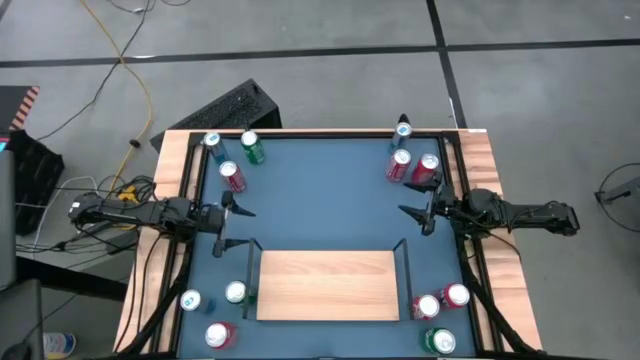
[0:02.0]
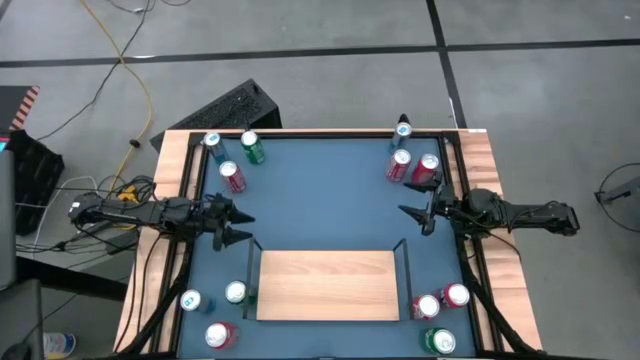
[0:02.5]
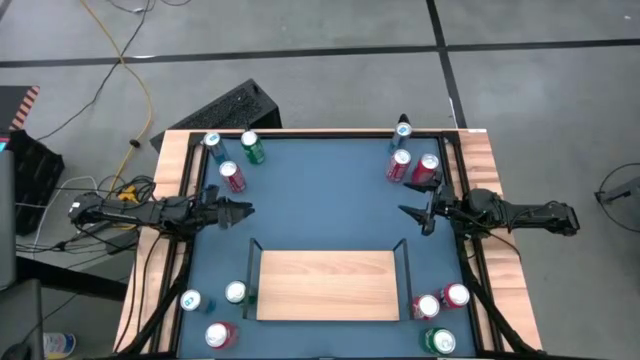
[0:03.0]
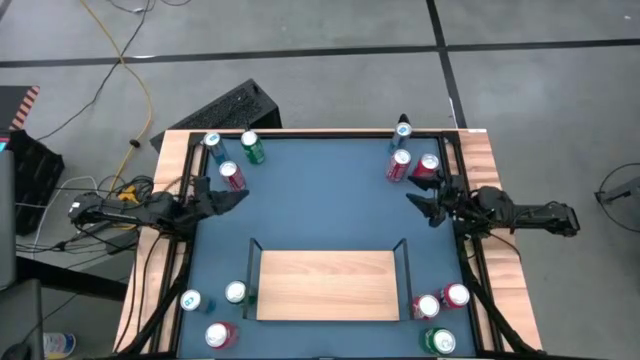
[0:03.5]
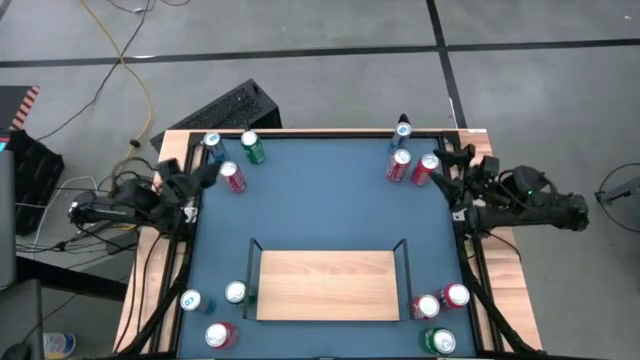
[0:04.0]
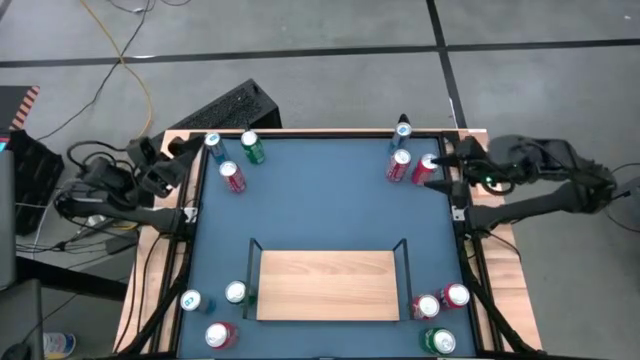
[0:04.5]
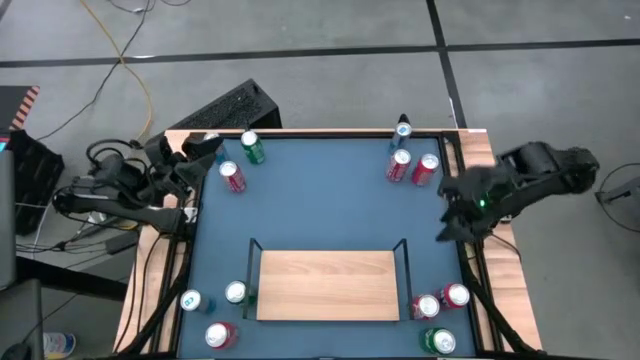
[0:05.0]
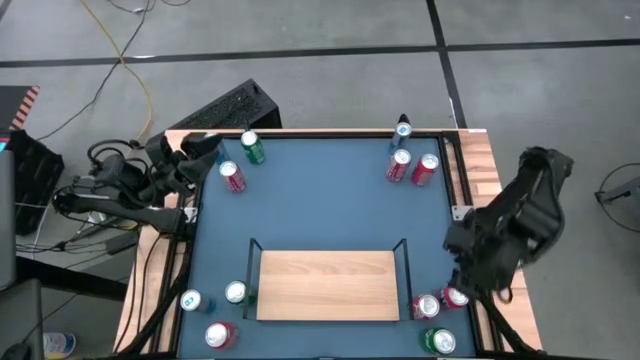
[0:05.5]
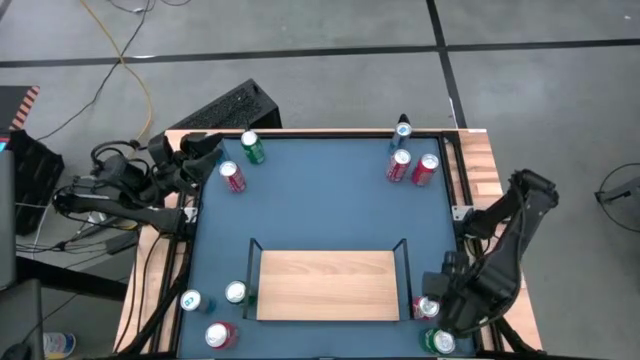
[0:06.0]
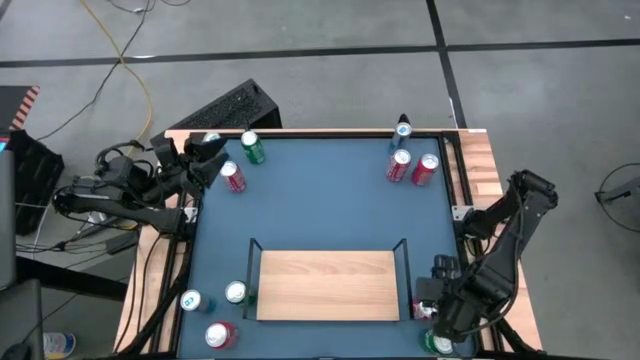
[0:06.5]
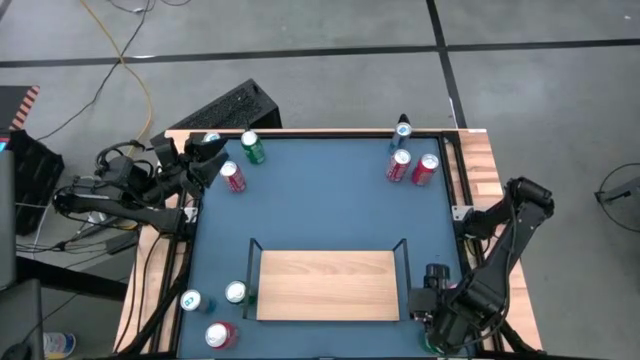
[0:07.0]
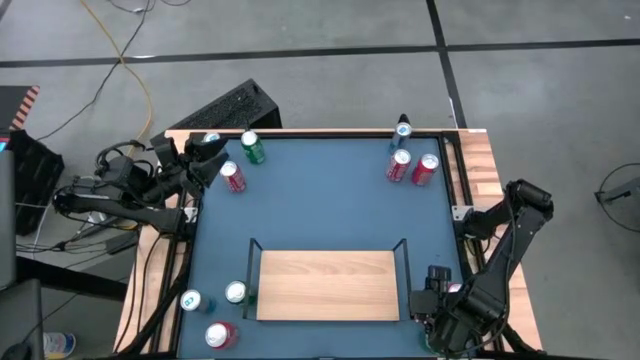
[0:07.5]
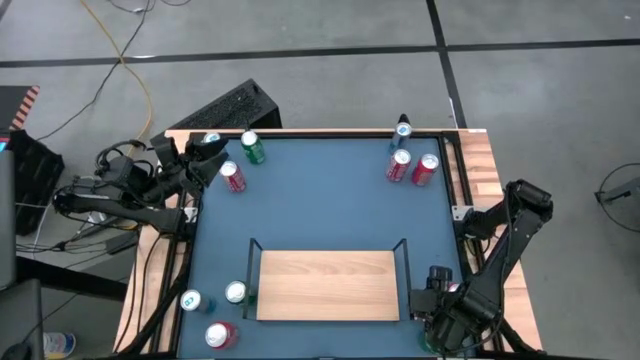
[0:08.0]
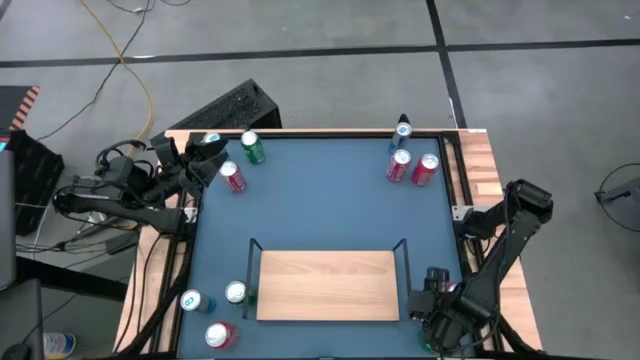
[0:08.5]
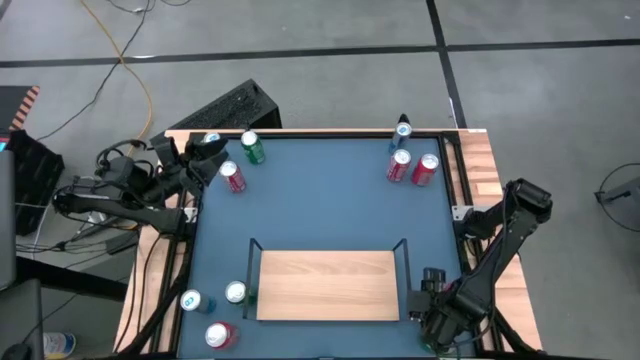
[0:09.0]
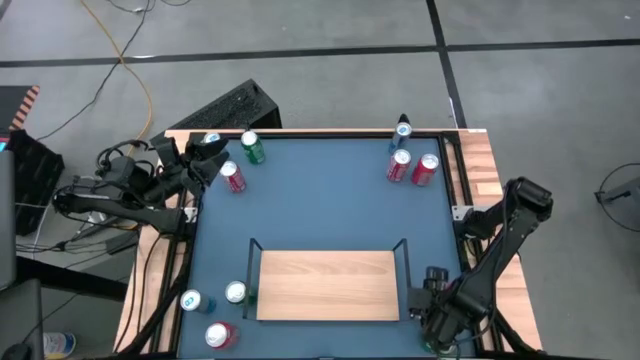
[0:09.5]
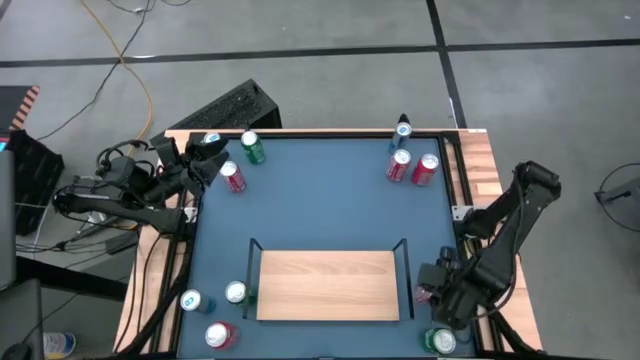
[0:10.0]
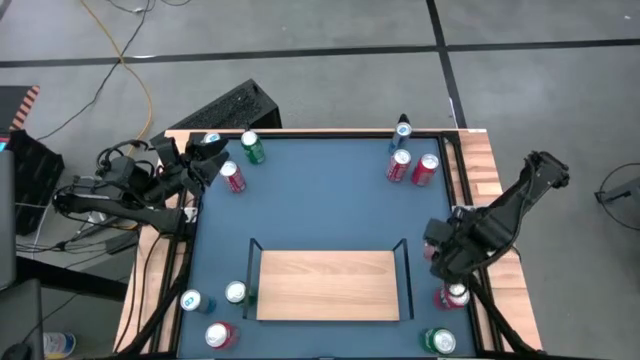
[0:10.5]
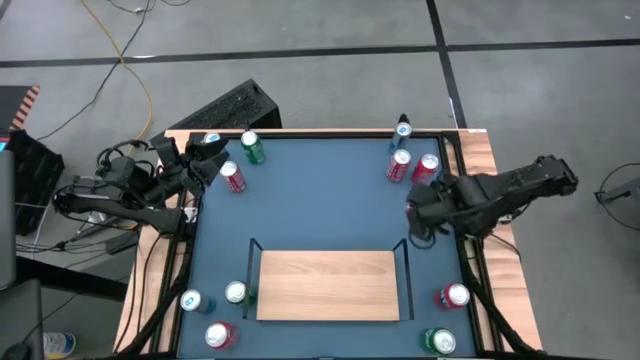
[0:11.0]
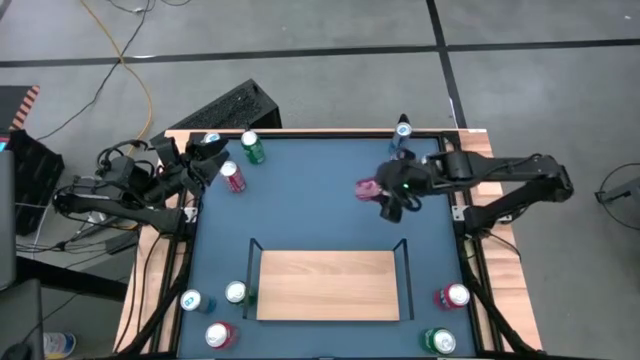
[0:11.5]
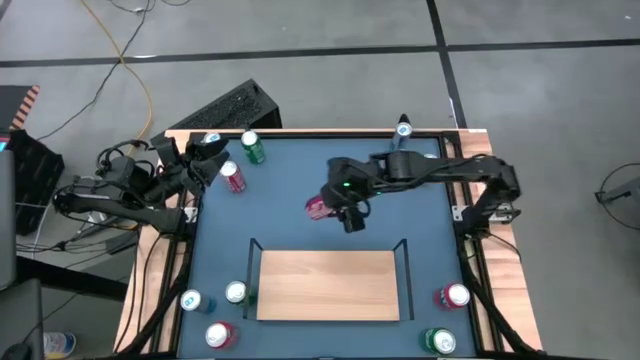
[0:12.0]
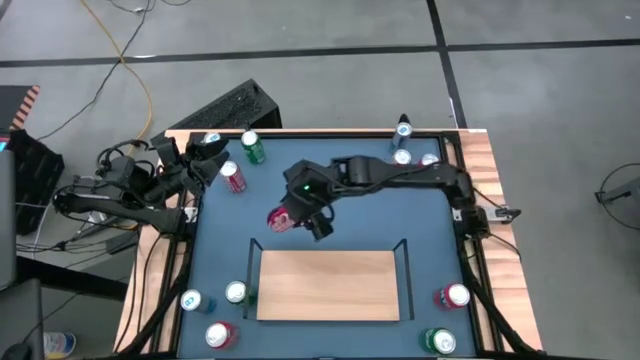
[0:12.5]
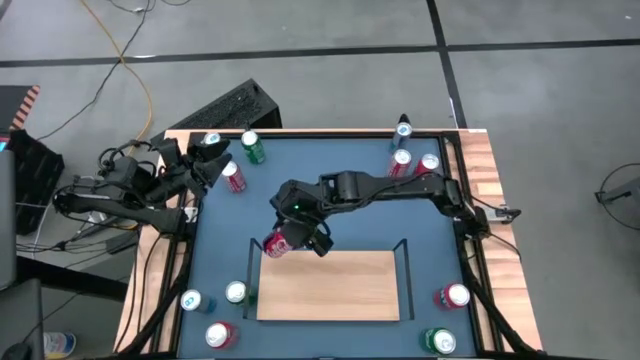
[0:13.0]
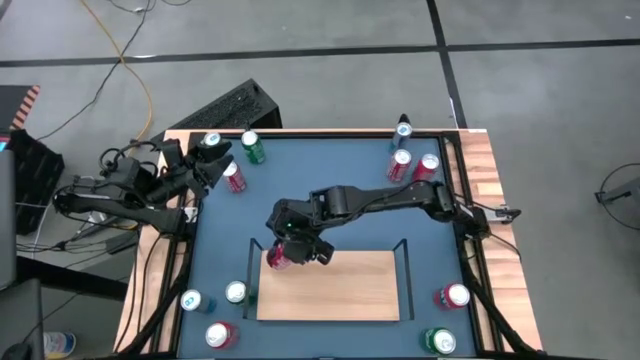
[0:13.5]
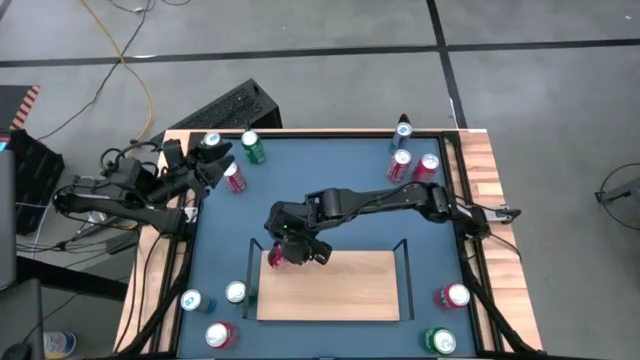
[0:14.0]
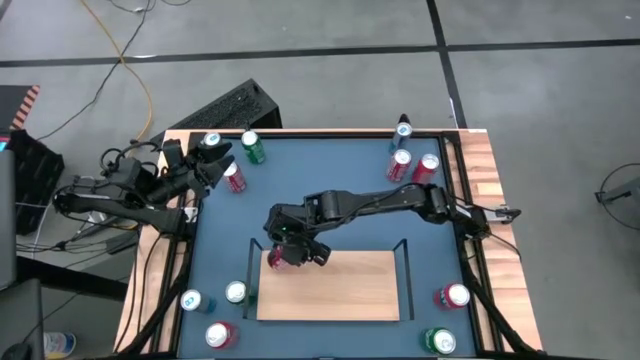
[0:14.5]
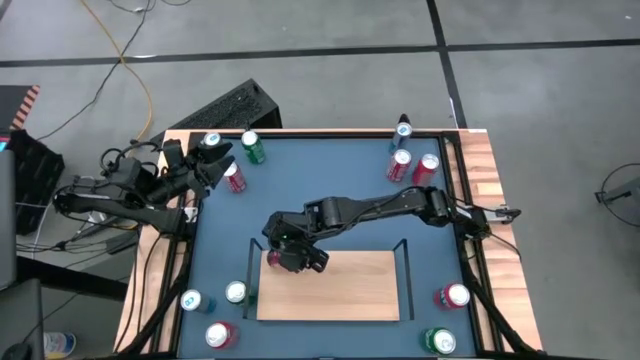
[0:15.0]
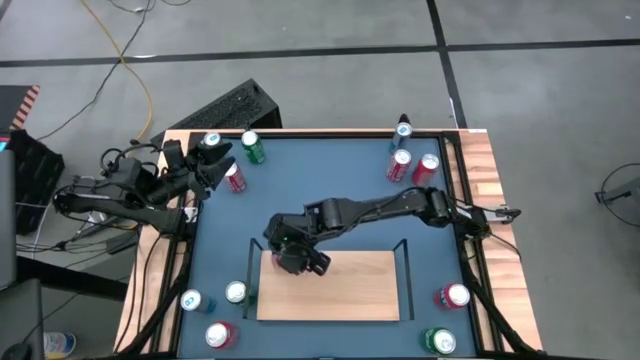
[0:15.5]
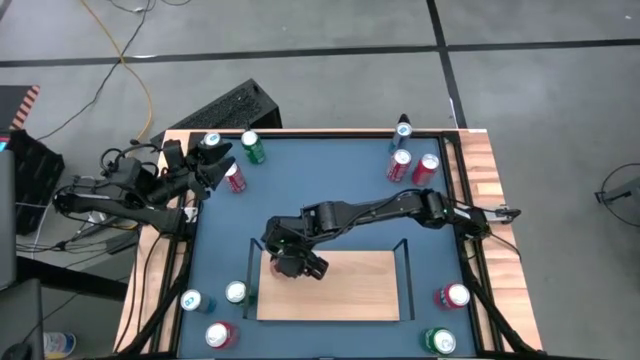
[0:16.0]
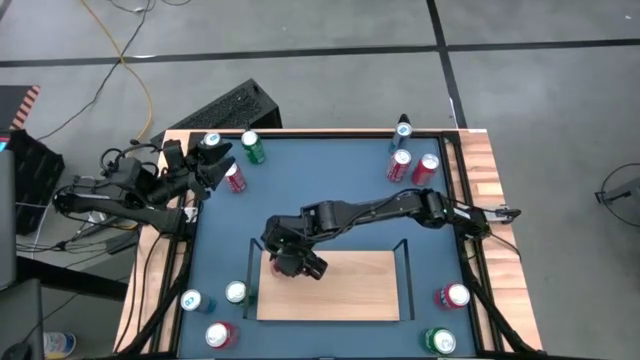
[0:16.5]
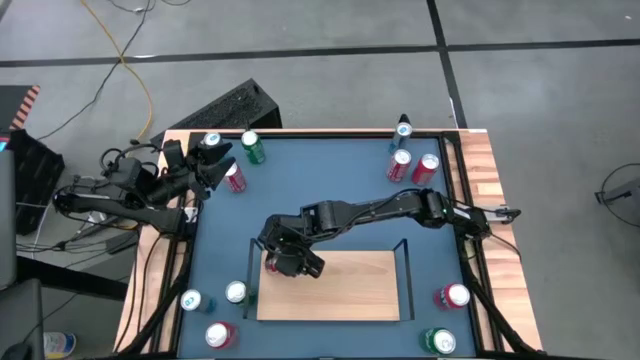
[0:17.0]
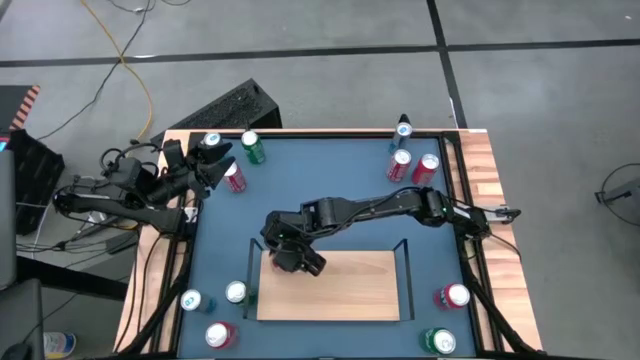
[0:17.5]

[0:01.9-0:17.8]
Task: Place canned beverage on shelf
Put the bottom right red soda can on the shelf

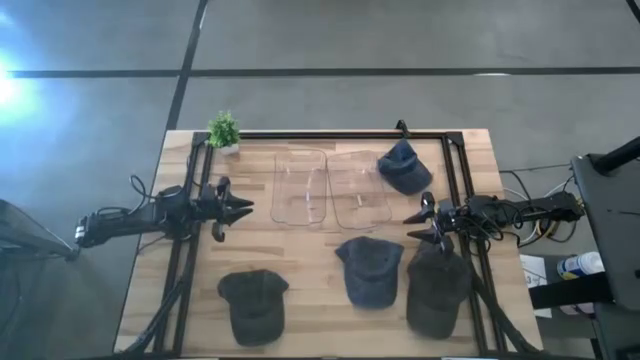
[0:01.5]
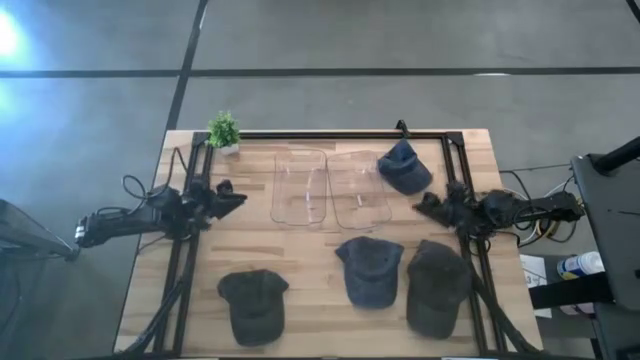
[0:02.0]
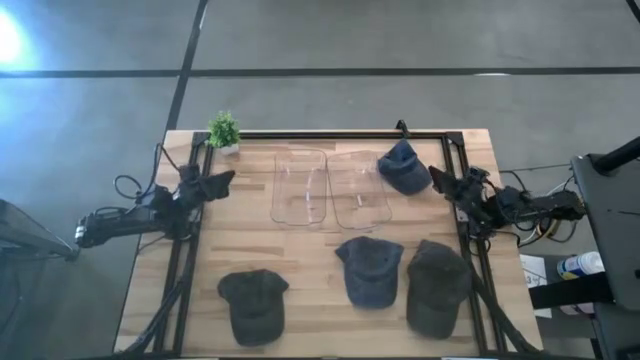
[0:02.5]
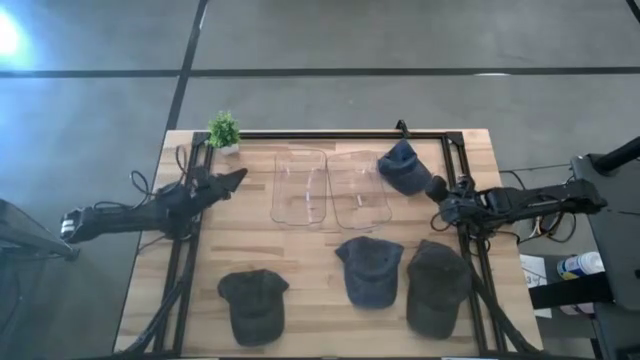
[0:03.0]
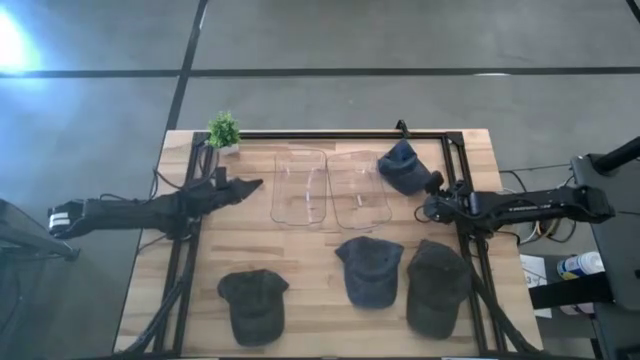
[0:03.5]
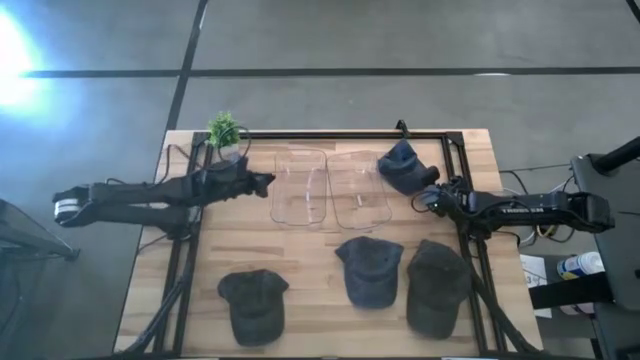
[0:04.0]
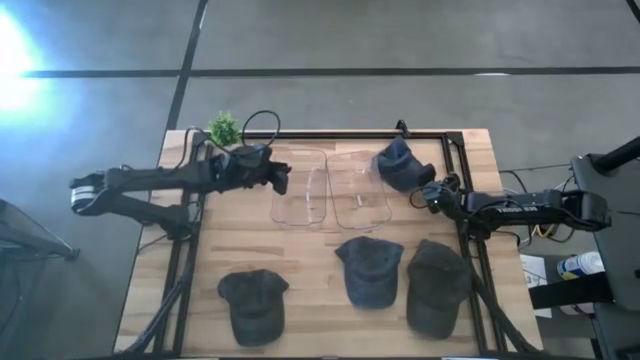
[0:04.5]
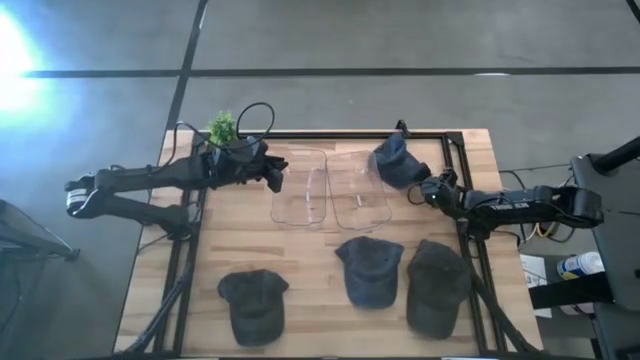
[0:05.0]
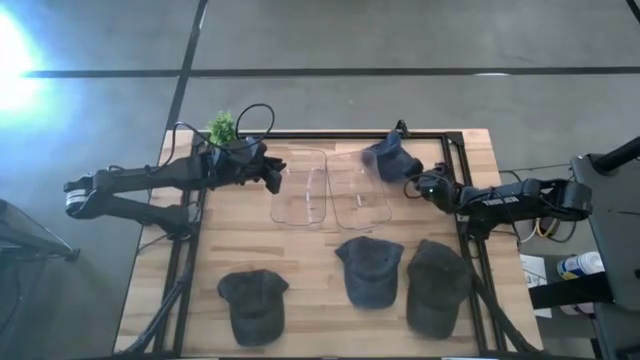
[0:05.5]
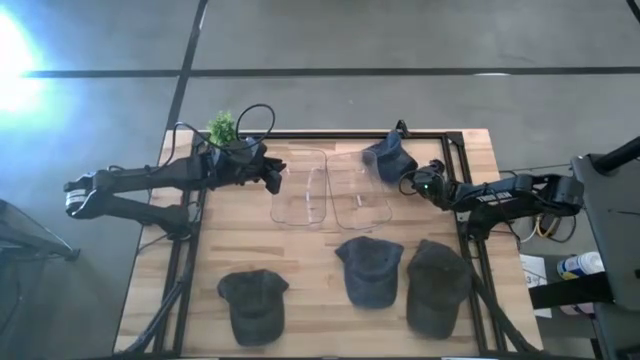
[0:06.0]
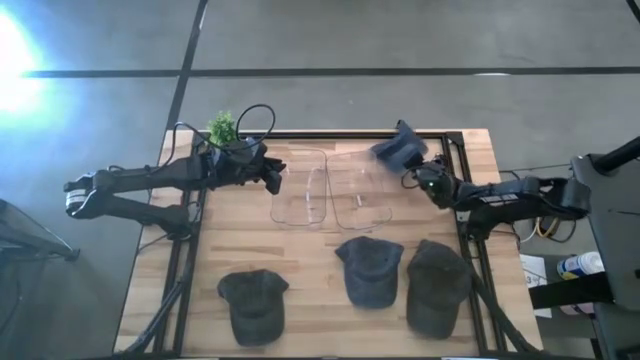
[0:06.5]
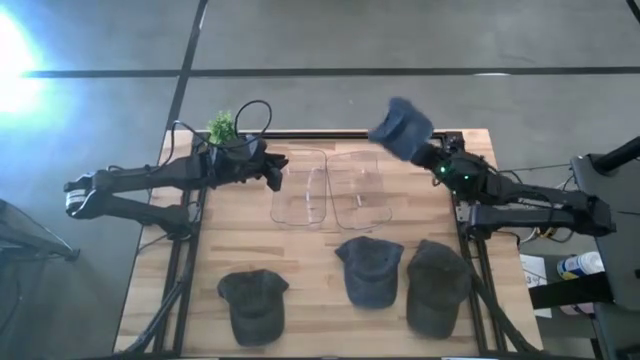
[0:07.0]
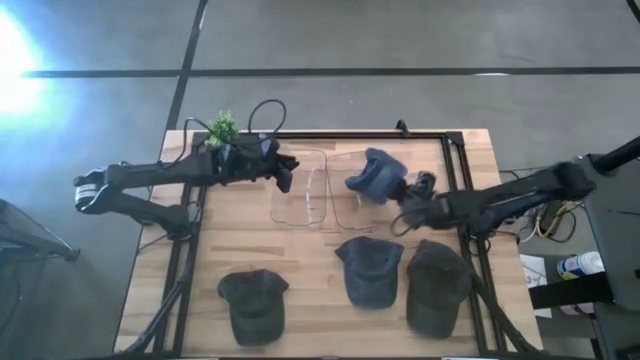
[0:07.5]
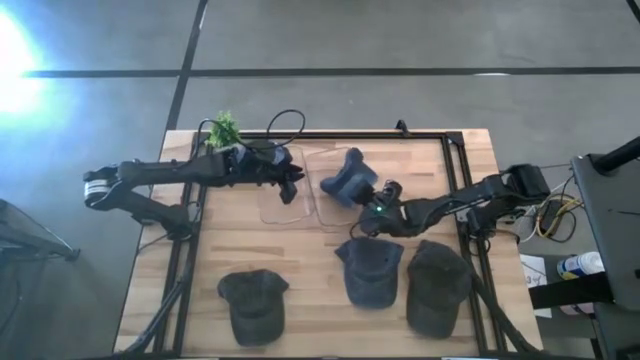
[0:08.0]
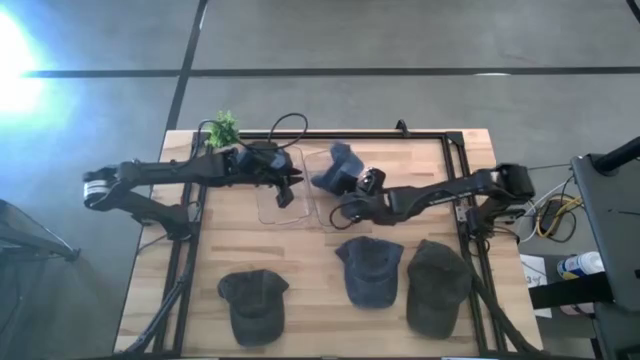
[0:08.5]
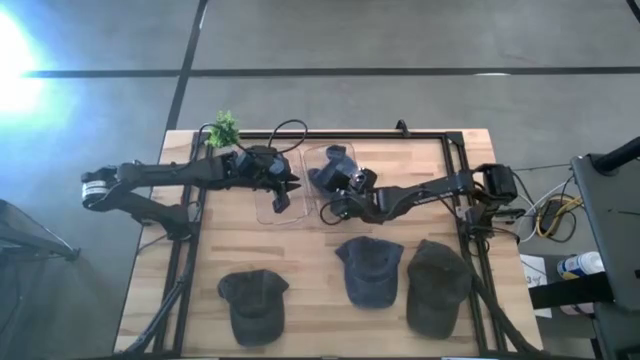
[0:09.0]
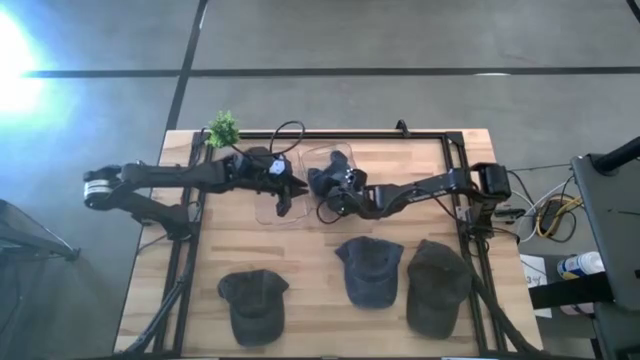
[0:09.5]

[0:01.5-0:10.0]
Task: Pick & Place hat
Put the top blue cap into the right transparent bin
